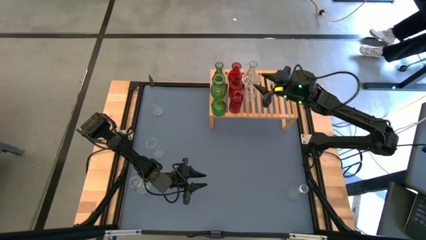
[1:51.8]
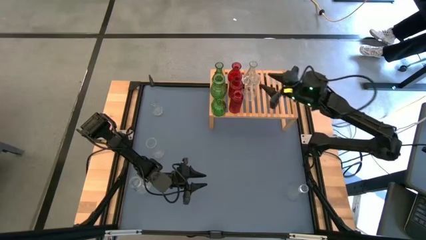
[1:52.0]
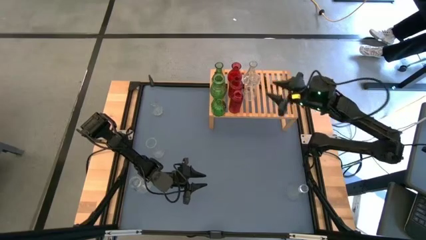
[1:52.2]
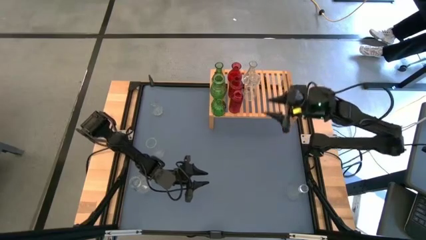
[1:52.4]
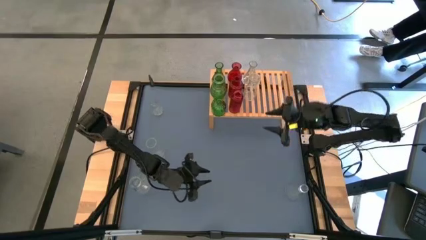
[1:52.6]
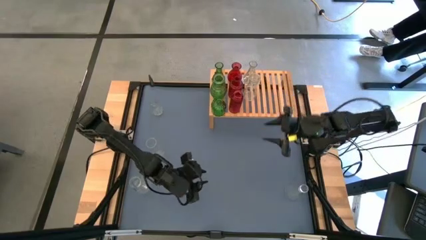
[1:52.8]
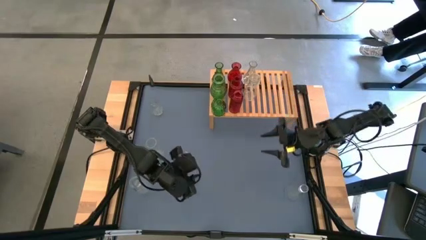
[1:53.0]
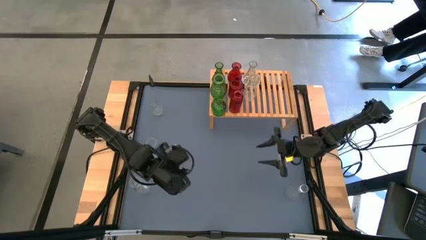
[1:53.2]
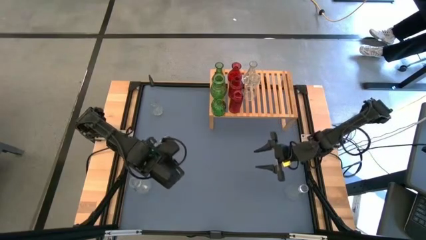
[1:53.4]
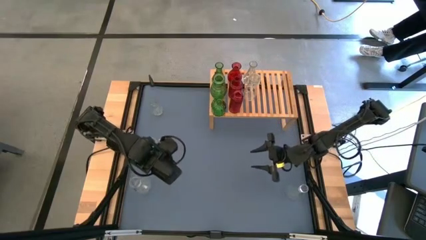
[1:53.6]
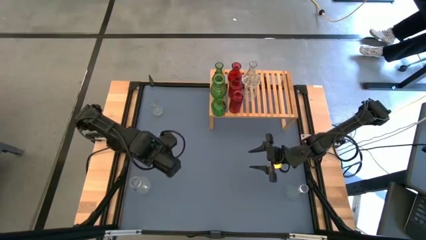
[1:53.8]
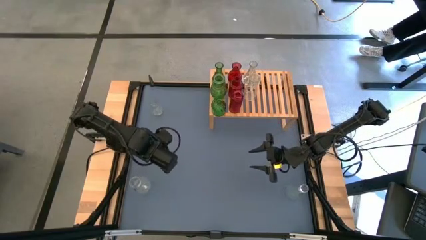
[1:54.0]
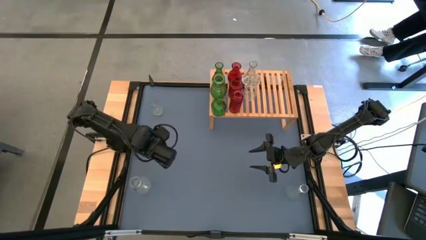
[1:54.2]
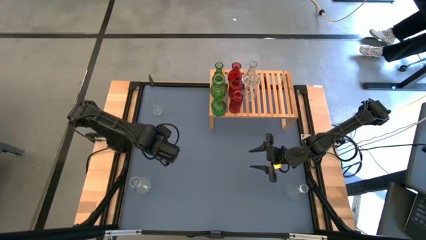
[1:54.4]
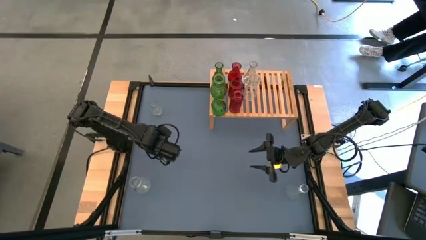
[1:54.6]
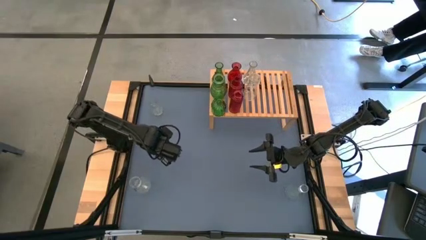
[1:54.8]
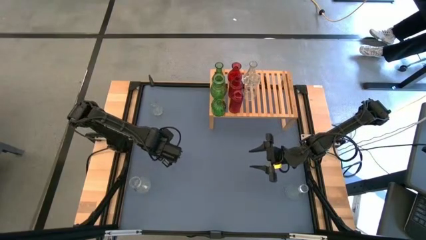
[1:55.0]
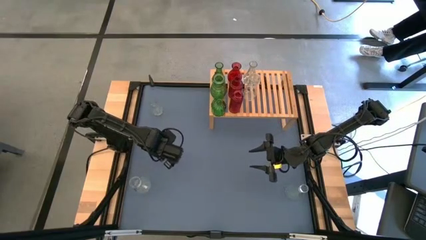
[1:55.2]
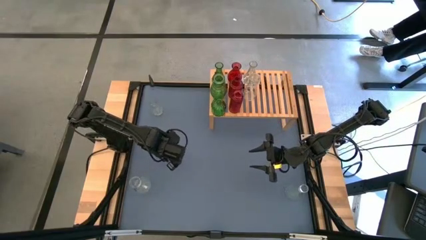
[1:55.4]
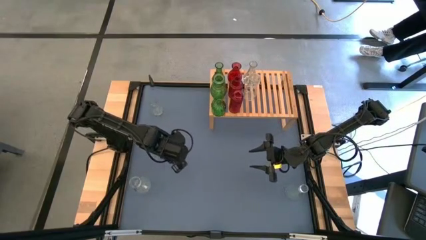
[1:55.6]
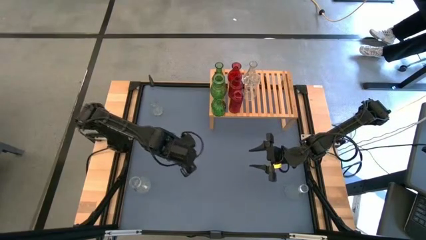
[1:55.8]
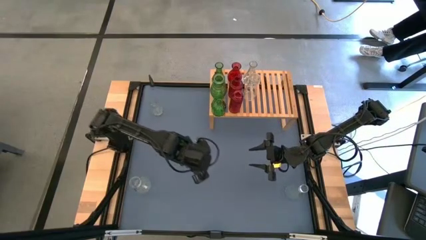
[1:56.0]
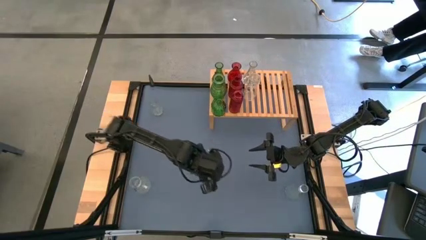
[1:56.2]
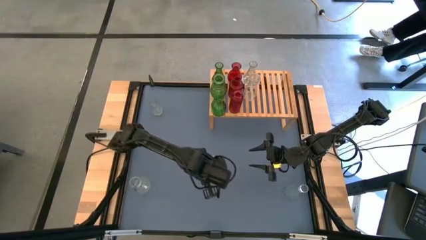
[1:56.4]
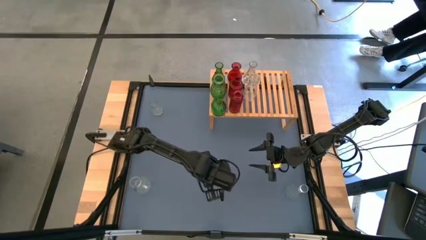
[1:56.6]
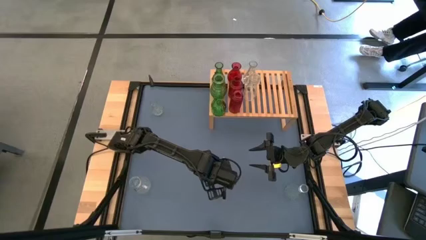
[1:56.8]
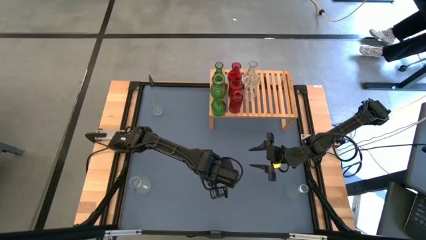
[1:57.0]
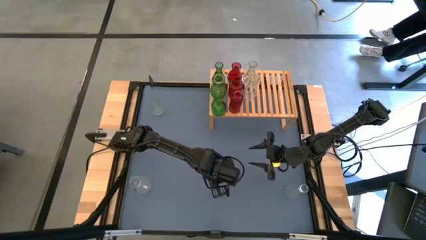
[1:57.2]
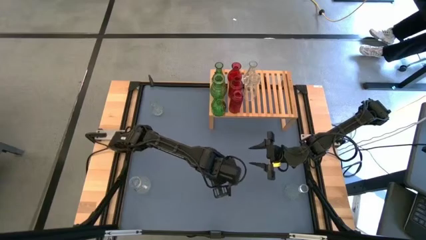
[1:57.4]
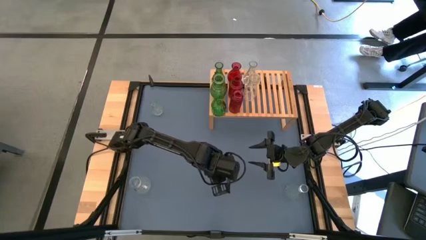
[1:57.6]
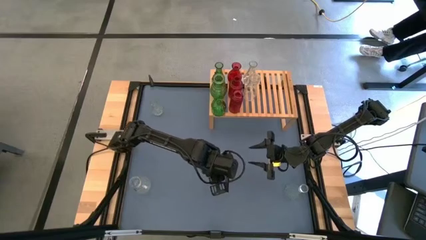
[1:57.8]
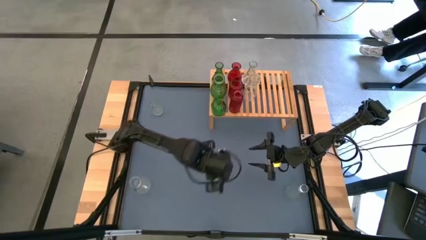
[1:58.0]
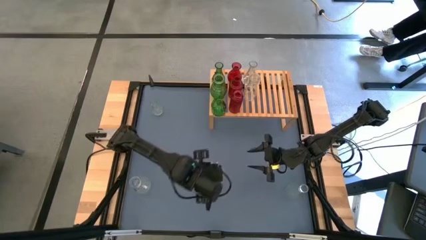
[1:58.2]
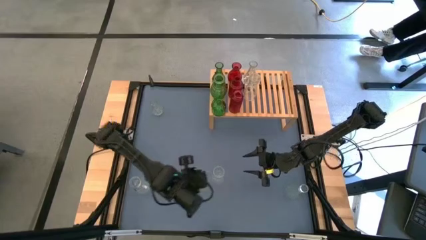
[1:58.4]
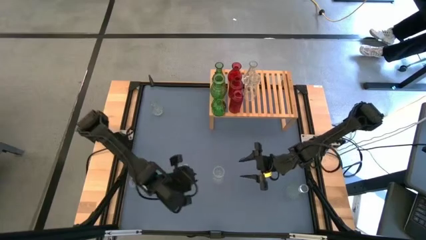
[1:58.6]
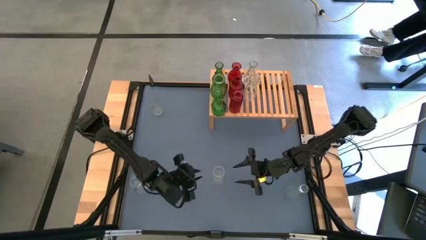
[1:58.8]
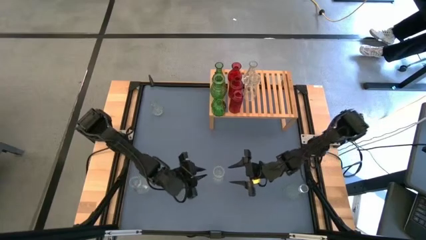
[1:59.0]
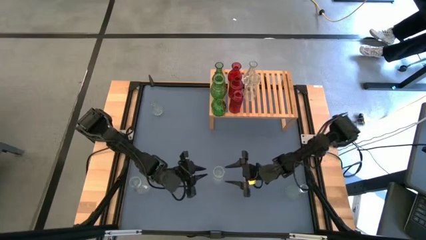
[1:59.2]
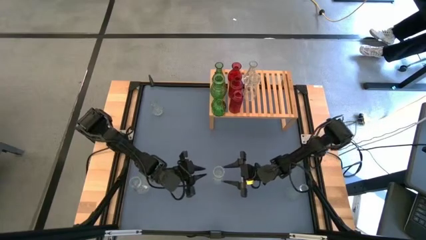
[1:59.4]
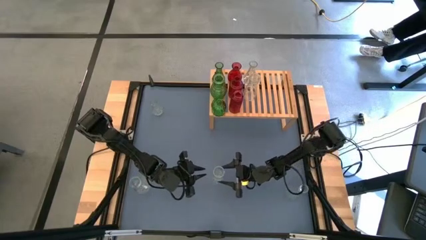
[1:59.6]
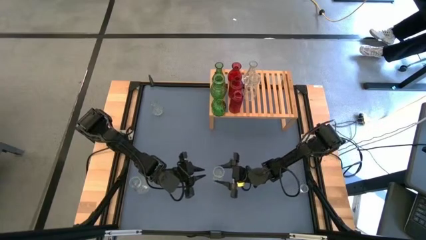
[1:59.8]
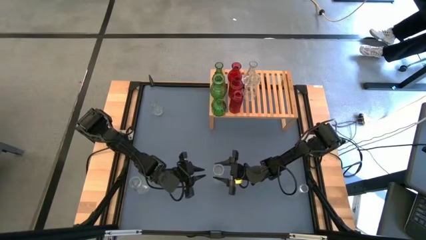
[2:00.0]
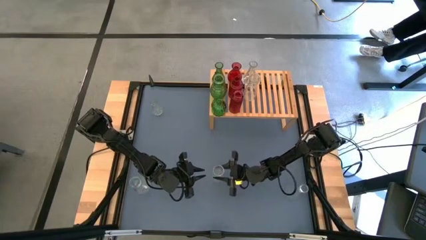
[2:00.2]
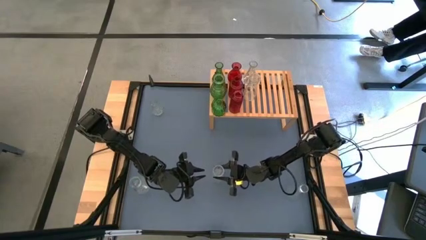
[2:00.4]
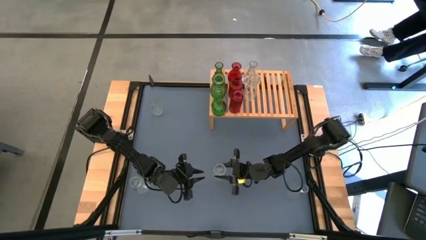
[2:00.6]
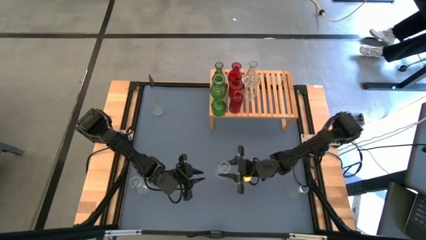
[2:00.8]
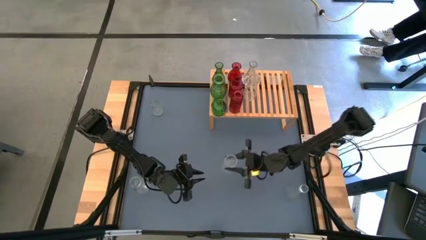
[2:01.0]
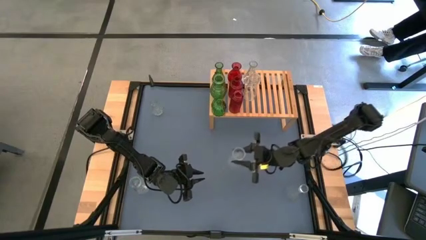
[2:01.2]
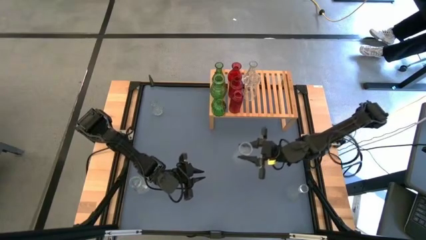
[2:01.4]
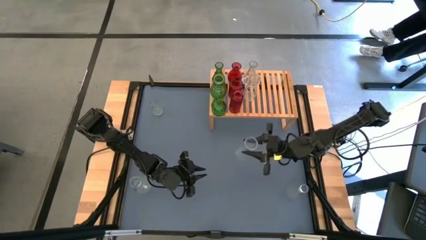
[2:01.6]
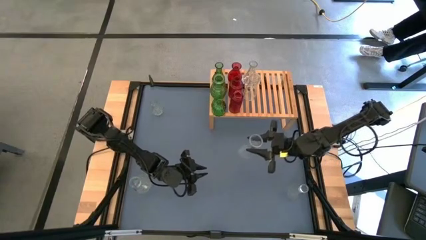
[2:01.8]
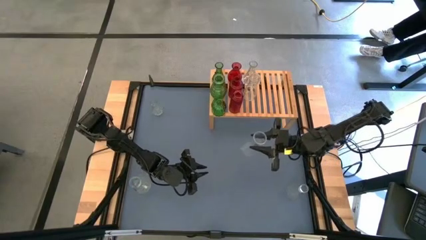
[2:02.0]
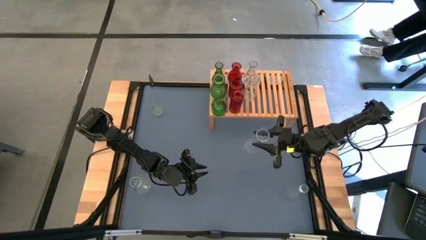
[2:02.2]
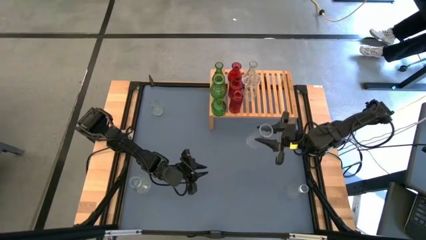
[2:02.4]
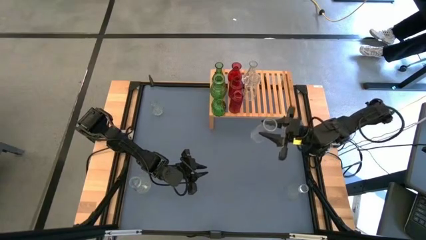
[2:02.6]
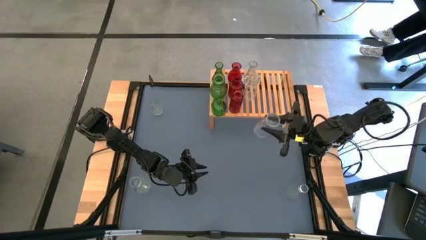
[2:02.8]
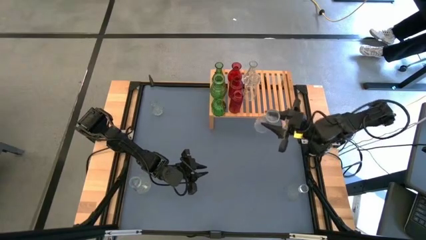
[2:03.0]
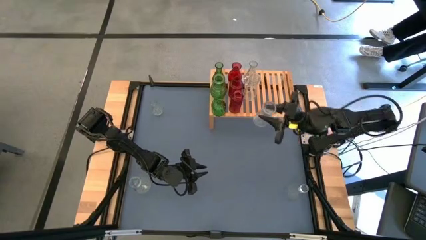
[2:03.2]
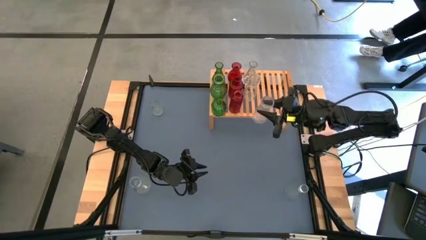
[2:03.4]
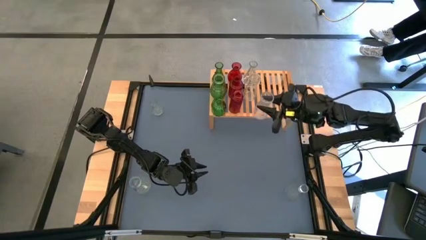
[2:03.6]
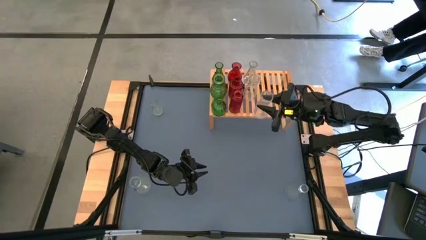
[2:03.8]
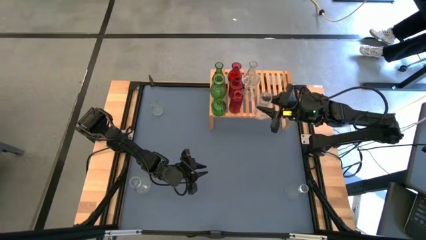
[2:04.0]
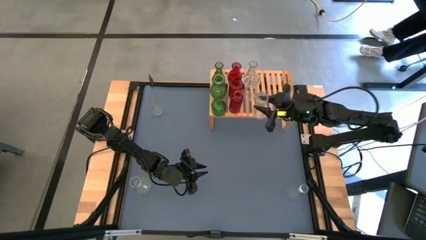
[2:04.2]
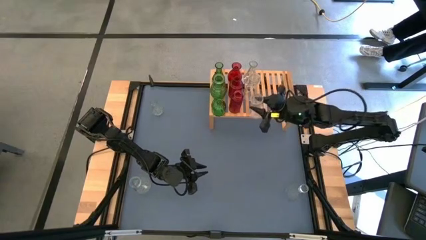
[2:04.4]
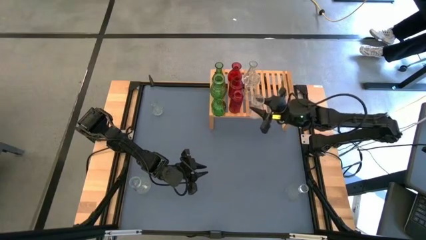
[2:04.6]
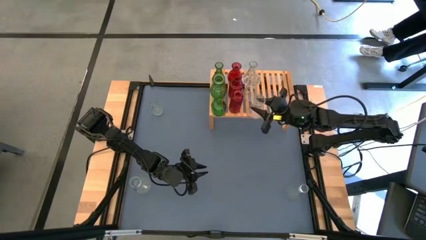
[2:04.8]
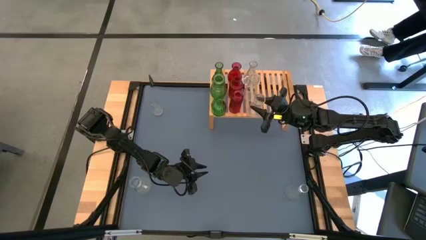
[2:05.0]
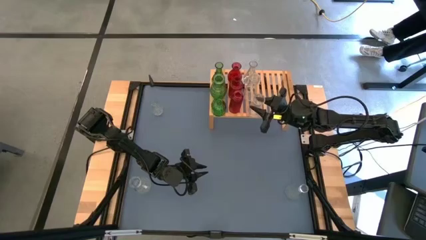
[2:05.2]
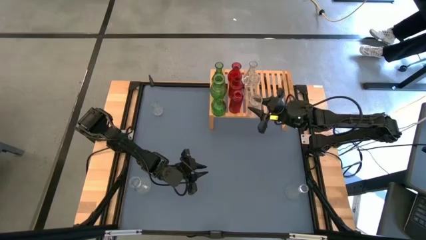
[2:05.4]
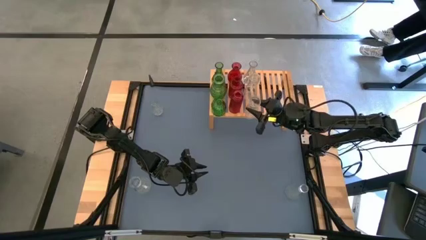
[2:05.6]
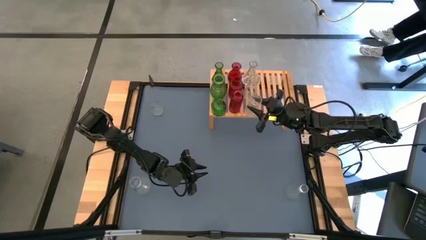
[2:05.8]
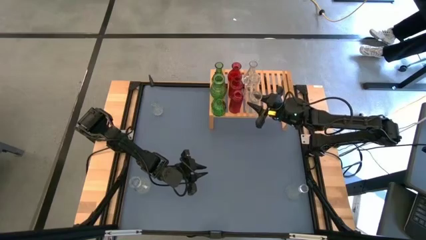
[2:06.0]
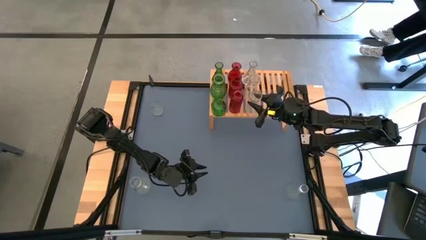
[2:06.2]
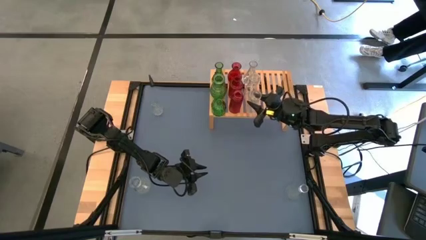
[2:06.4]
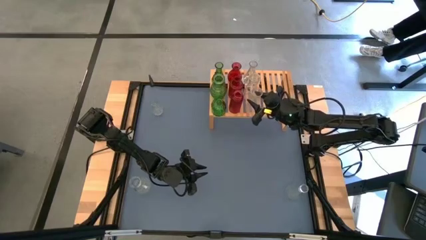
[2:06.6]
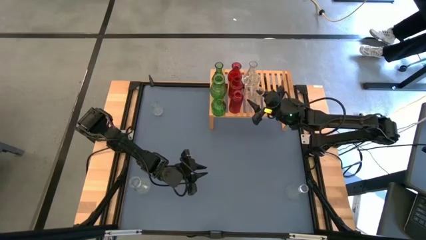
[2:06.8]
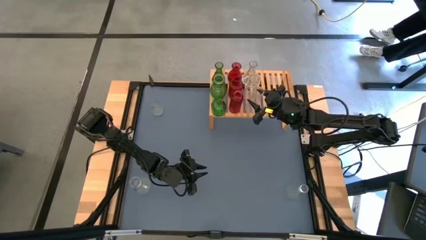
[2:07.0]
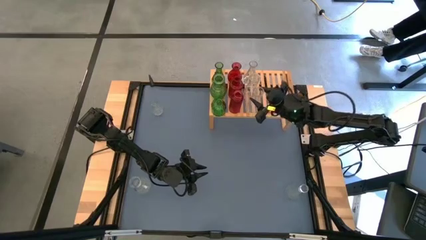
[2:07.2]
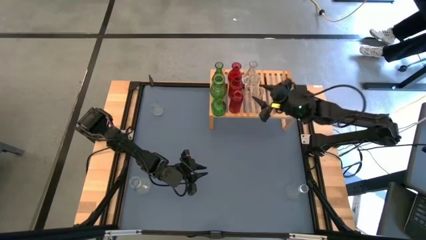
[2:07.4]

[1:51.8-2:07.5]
Task: sort vases onto shelf
Put the center transparent vase on the shelf, aligned with the other transparent vases
